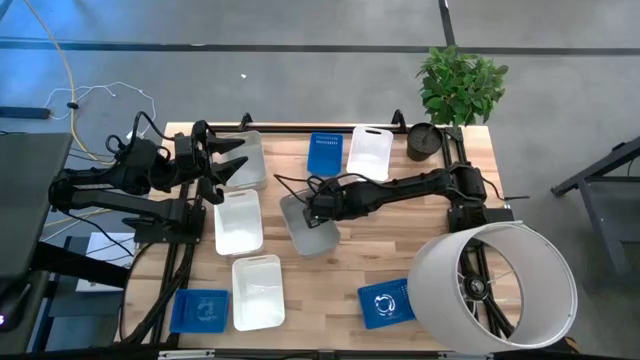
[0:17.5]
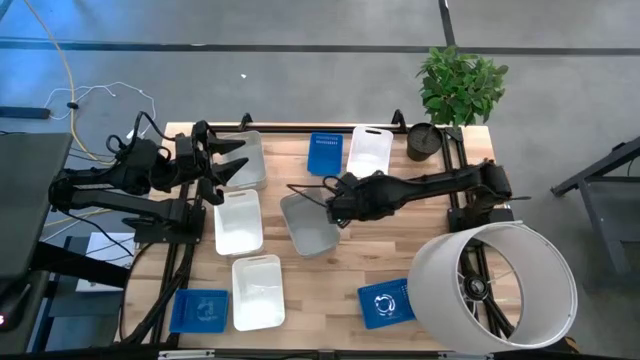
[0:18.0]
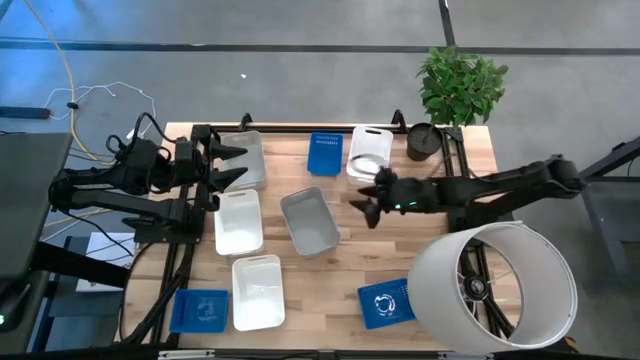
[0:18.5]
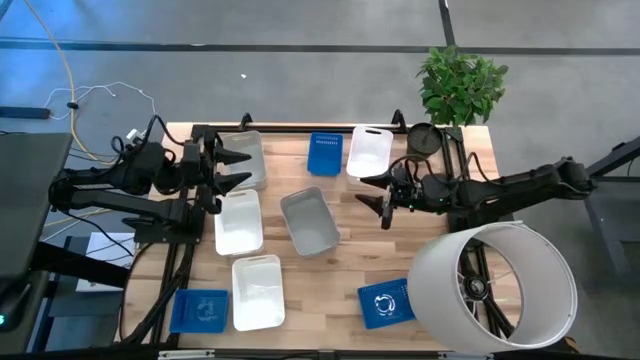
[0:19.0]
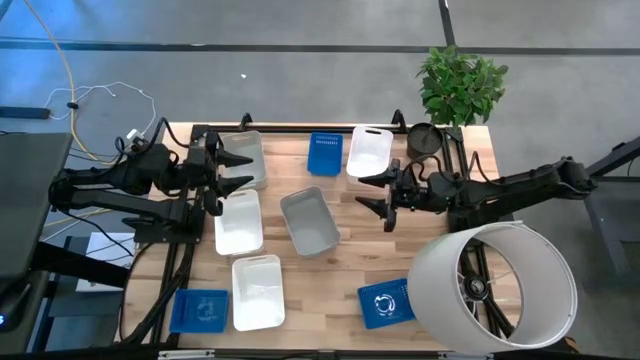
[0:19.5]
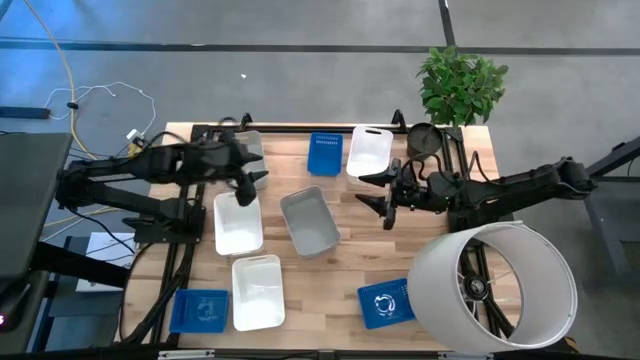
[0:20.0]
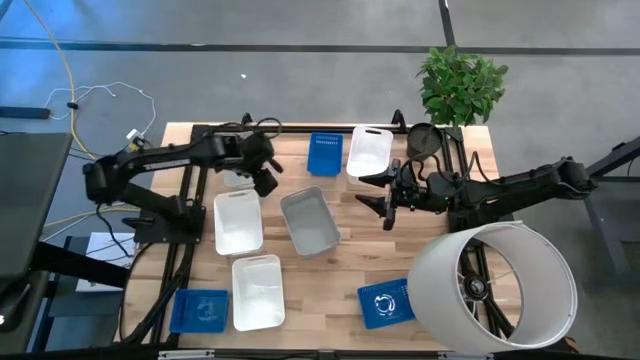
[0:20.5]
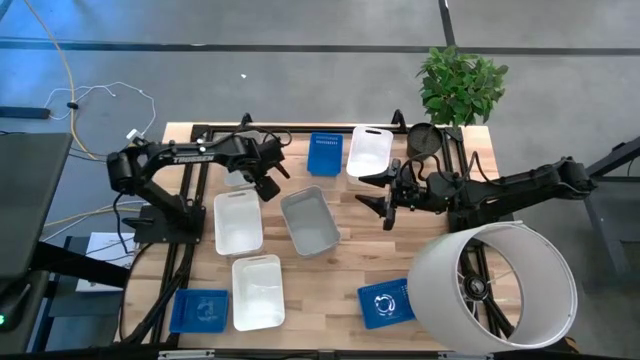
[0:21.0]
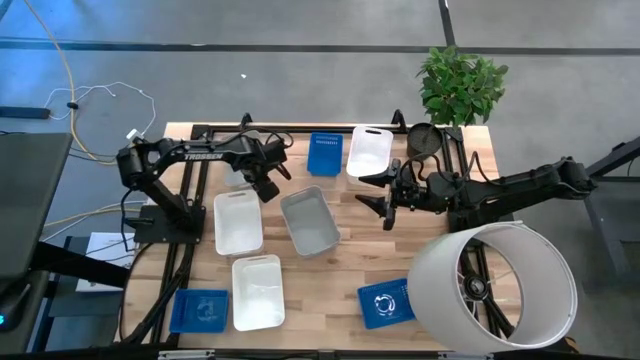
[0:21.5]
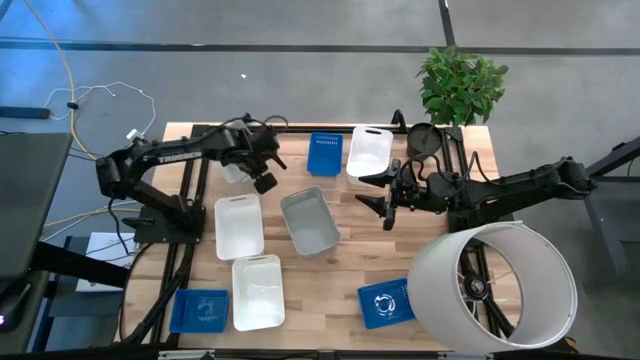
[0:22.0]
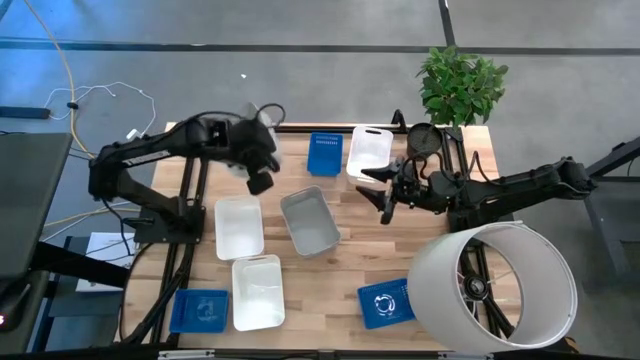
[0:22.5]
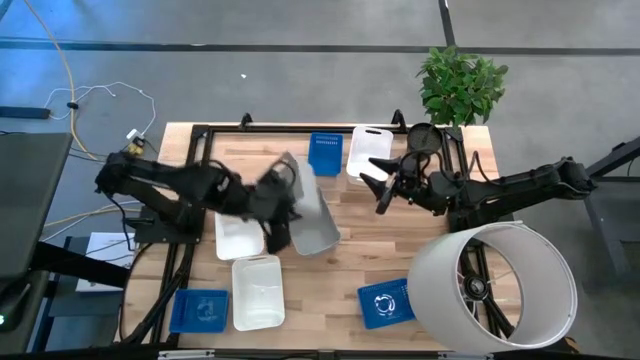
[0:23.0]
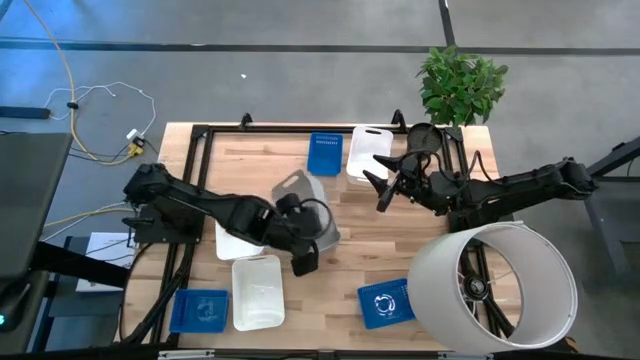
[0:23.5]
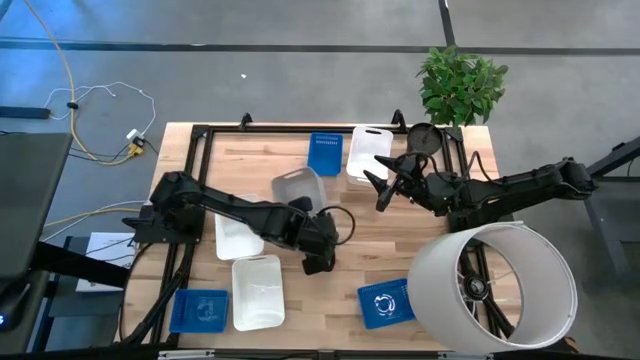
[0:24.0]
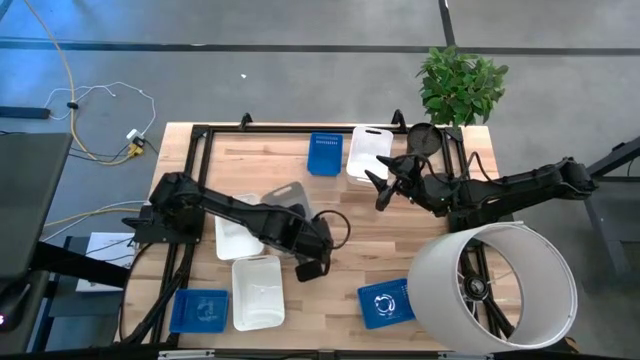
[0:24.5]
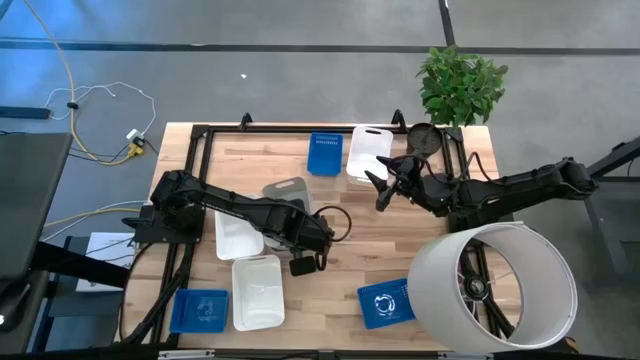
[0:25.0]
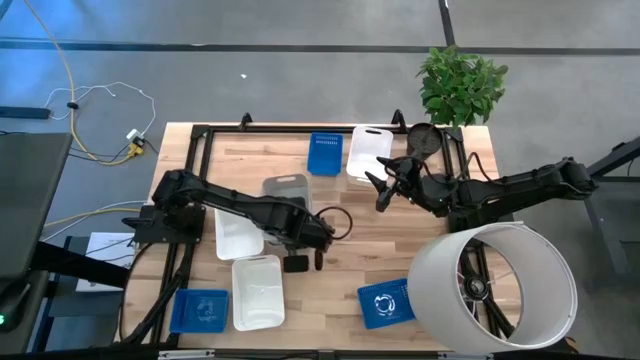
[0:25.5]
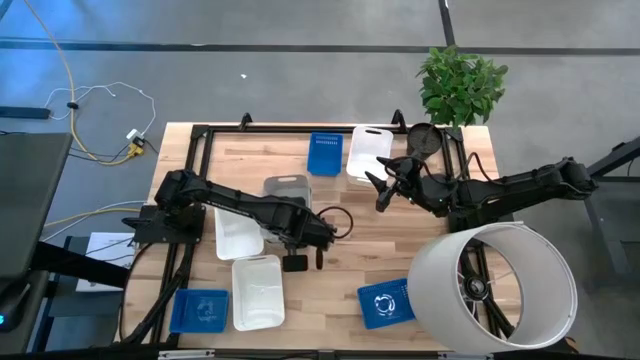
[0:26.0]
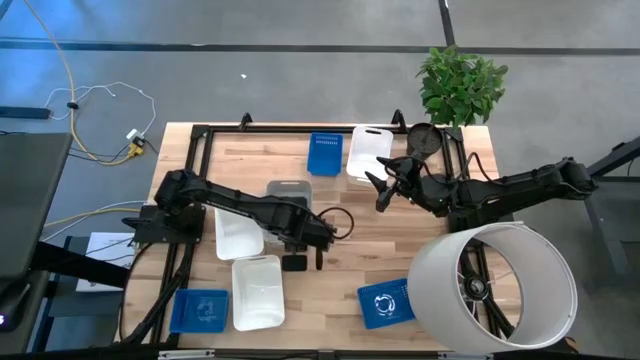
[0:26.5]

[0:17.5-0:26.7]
Stack the top gray bin on top of the middle gray bins

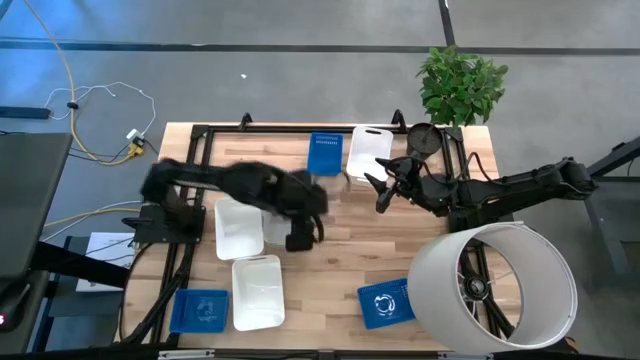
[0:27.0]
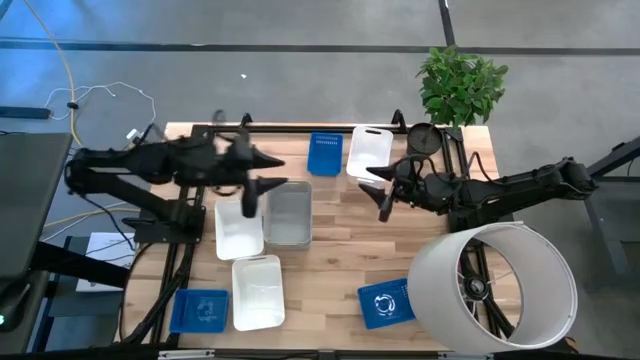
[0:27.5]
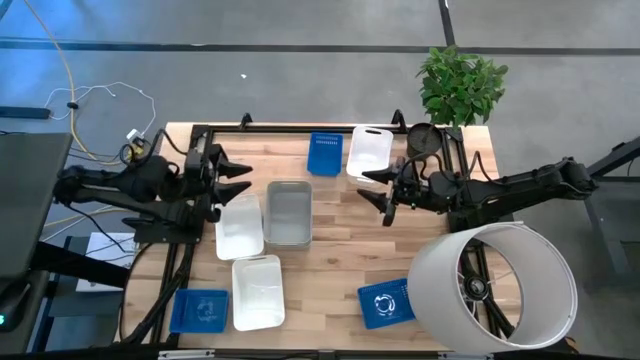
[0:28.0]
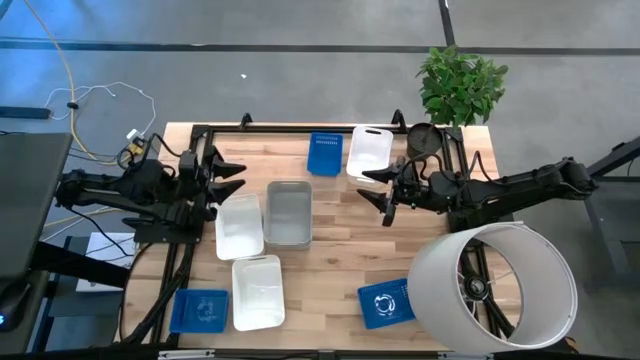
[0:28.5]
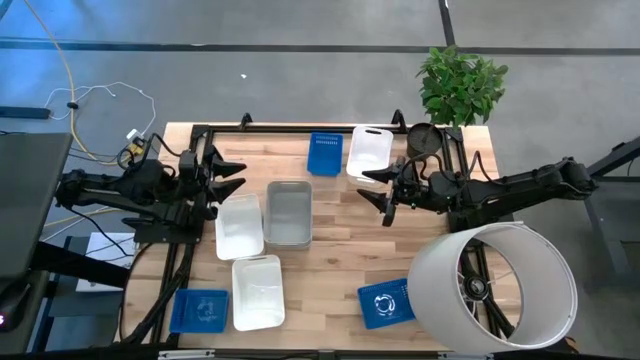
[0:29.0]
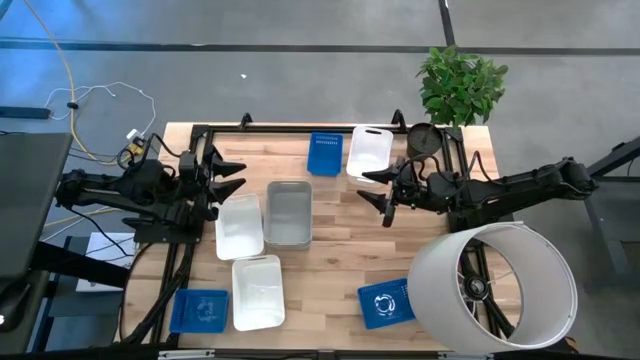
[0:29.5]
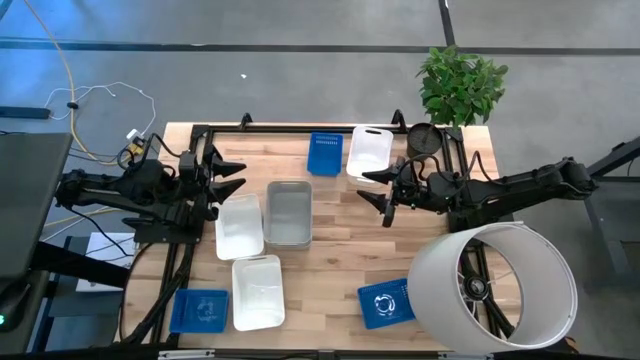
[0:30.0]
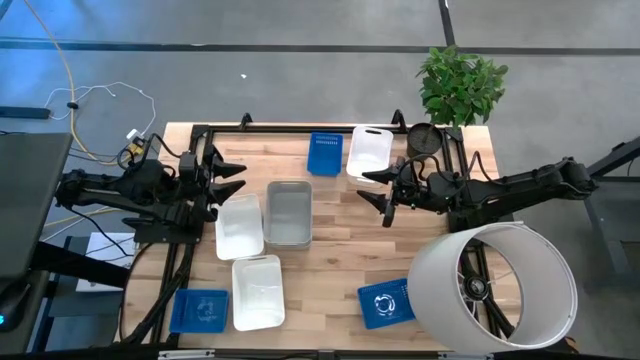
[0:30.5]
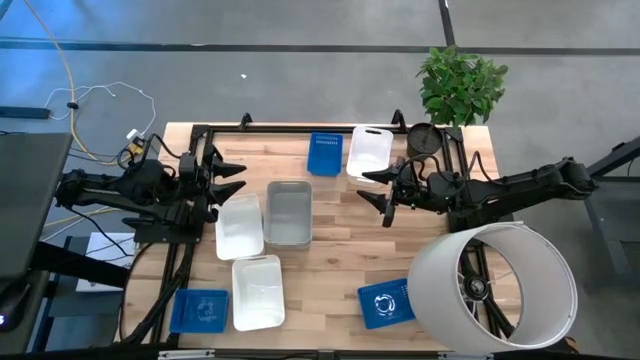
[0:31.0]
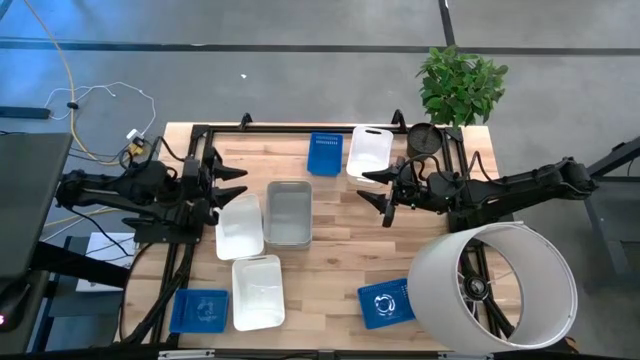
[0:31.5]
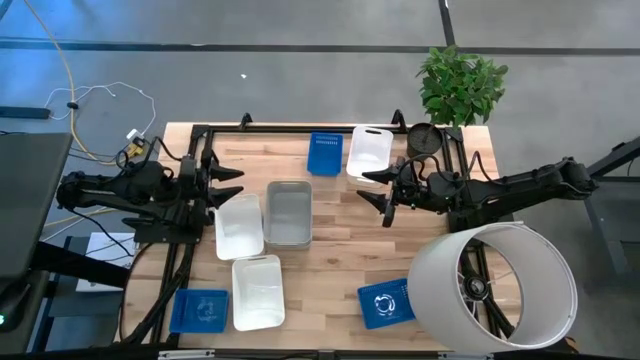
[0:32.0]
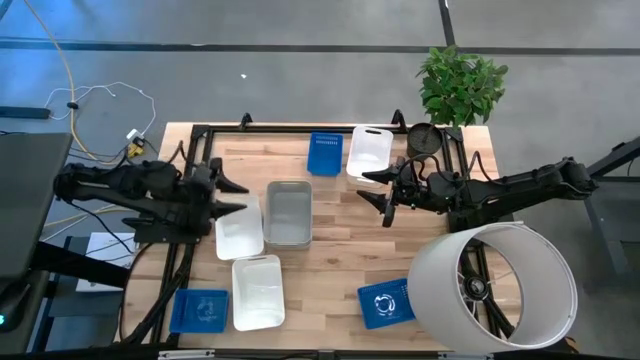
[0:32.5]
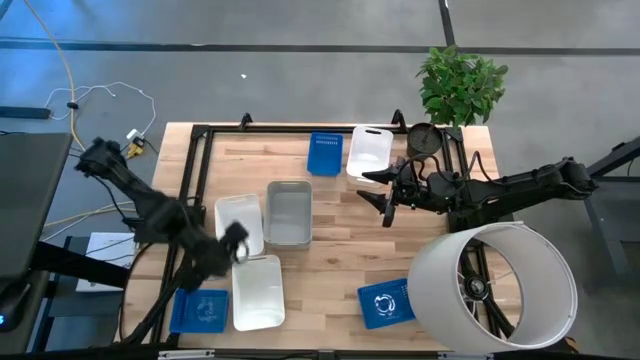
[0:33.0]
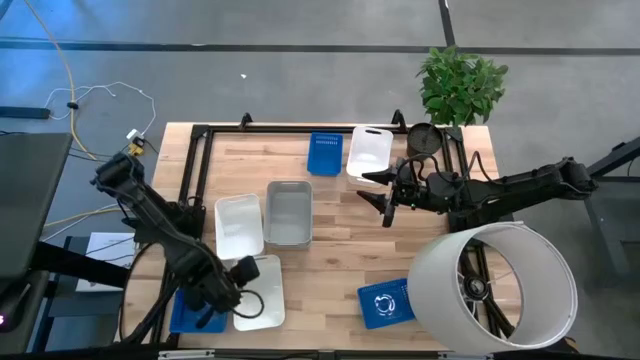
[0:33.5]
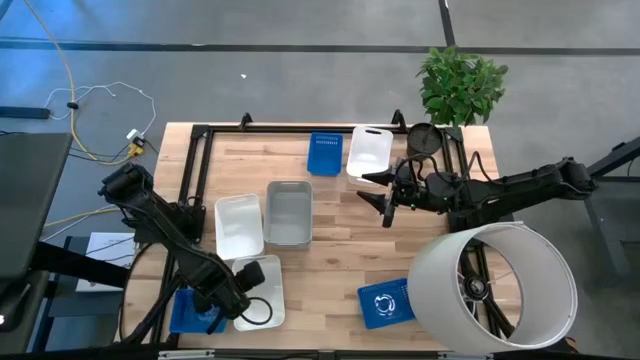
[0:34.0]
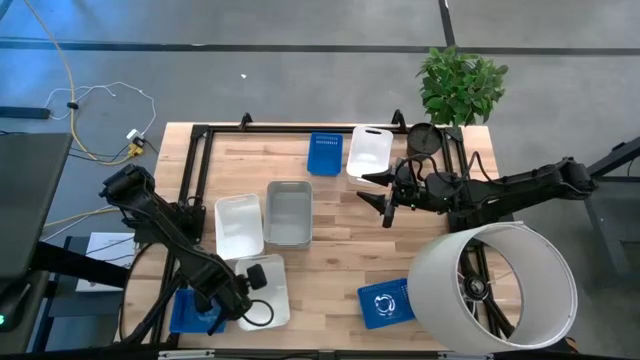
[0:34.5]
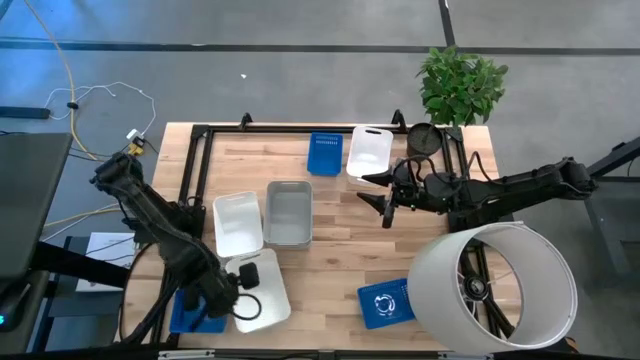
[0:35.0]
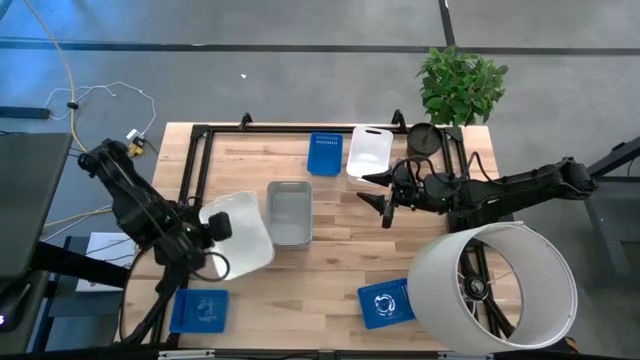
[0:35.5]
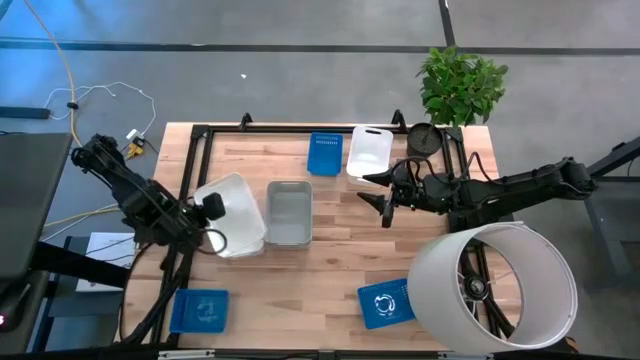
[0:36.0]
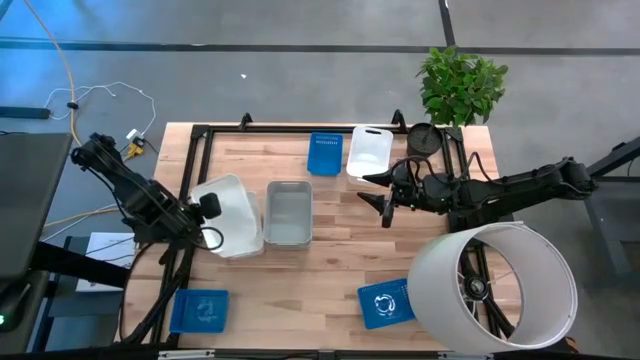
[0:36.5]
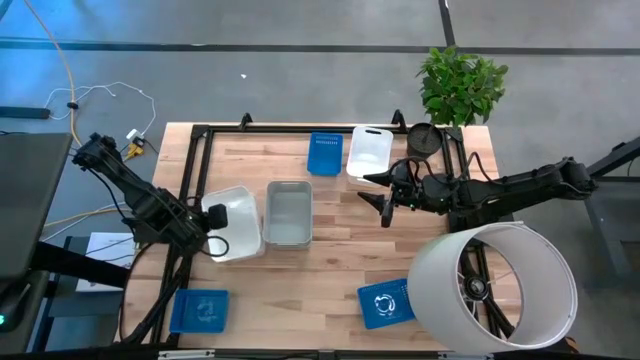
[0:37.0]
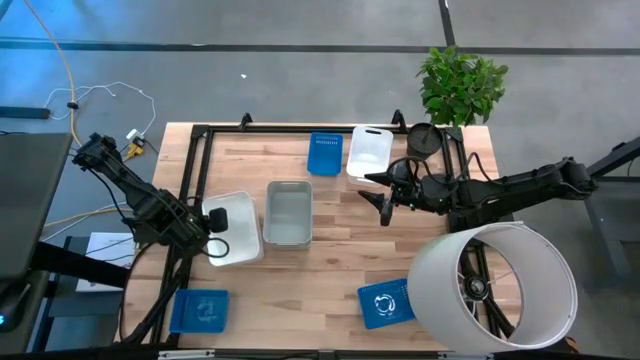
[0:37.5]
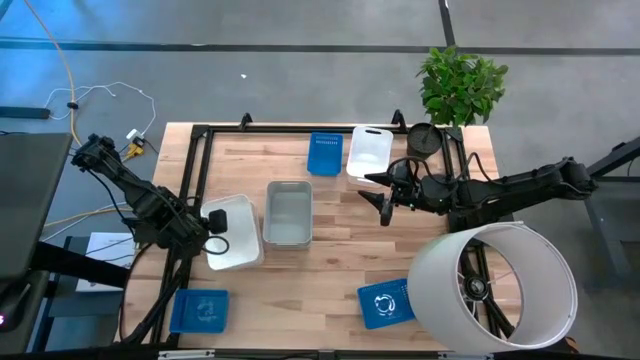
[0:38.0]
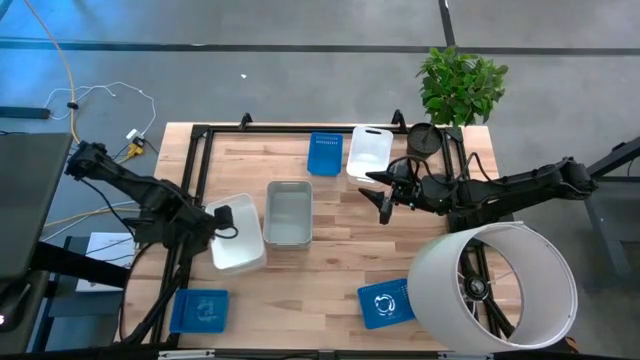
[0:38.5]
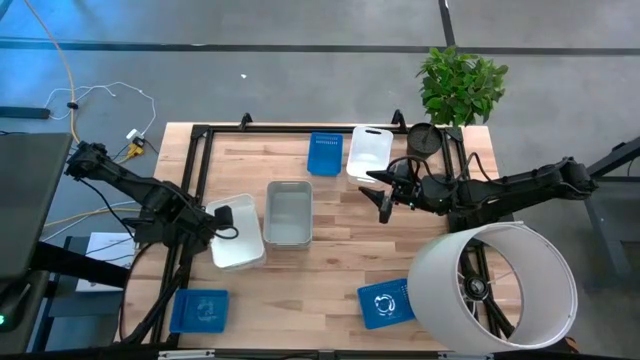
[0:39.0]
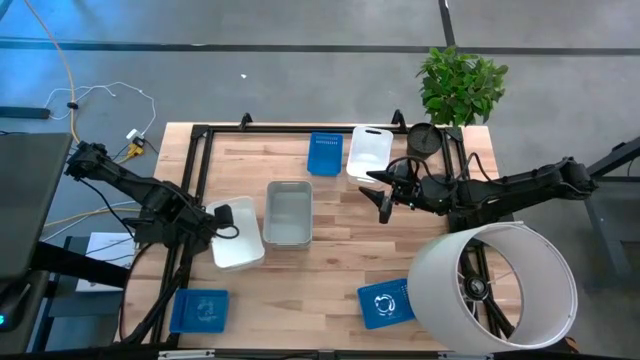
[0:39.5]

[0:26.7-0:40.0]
Stack the bottom white bin on top of the middle white bin
